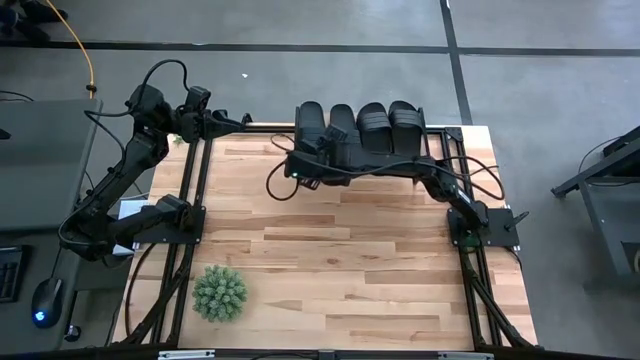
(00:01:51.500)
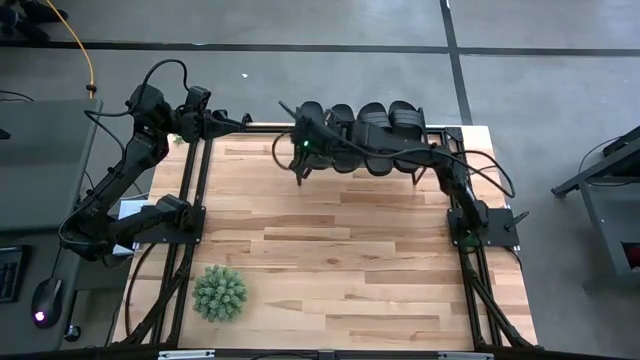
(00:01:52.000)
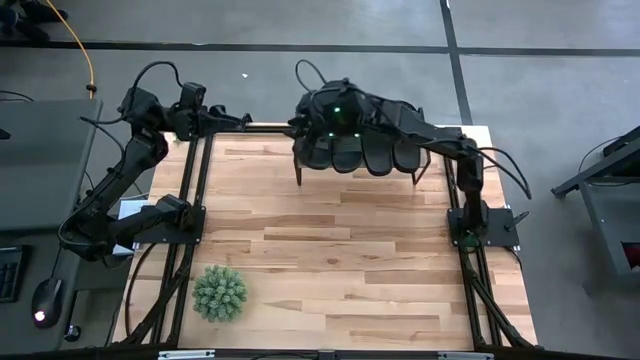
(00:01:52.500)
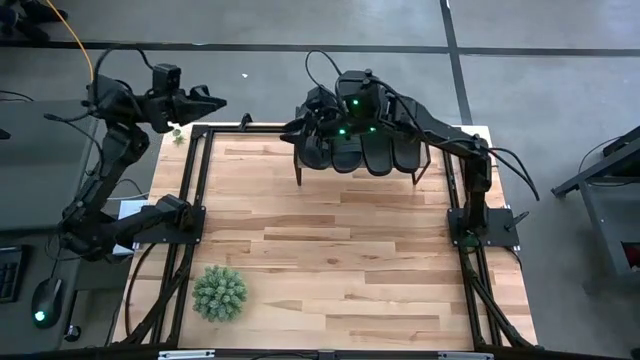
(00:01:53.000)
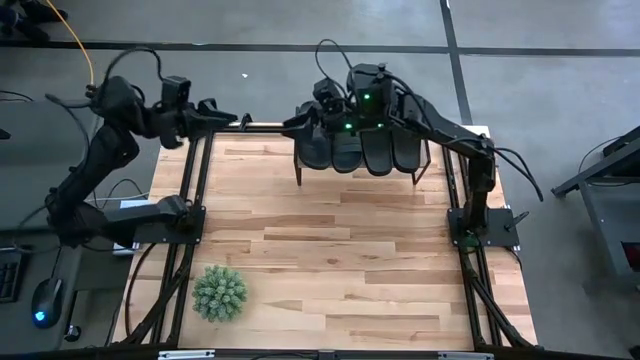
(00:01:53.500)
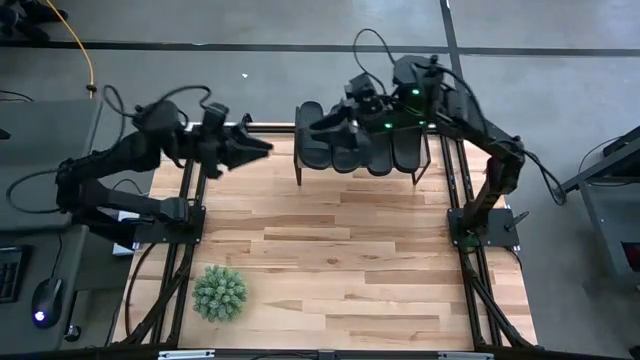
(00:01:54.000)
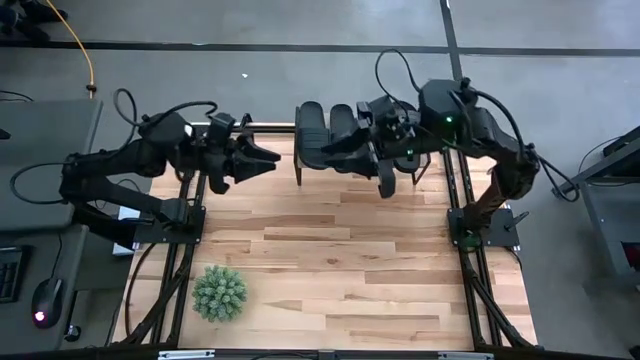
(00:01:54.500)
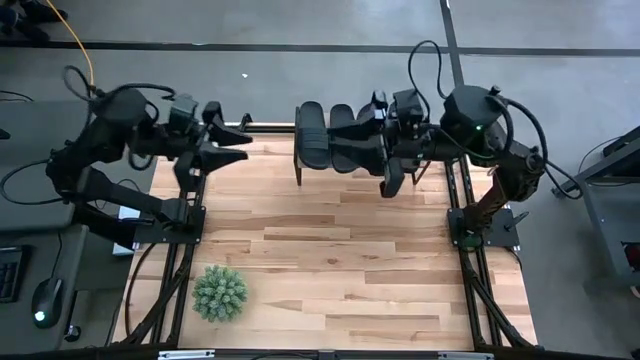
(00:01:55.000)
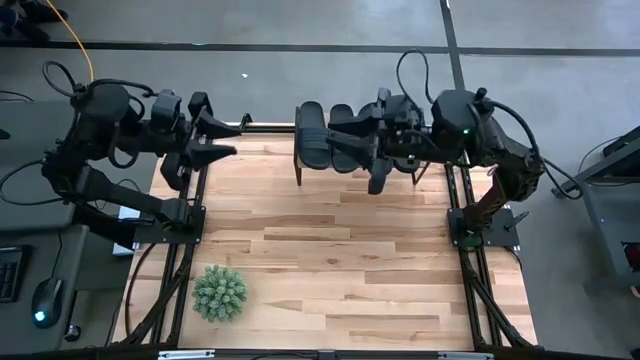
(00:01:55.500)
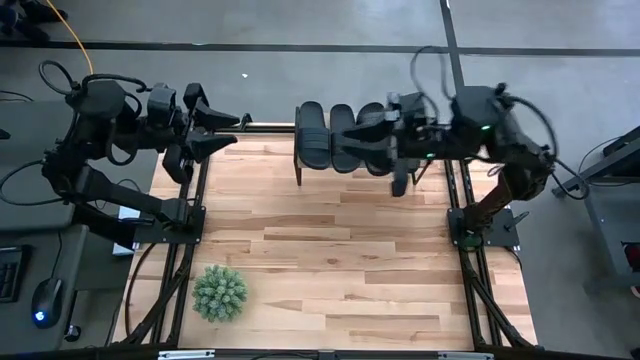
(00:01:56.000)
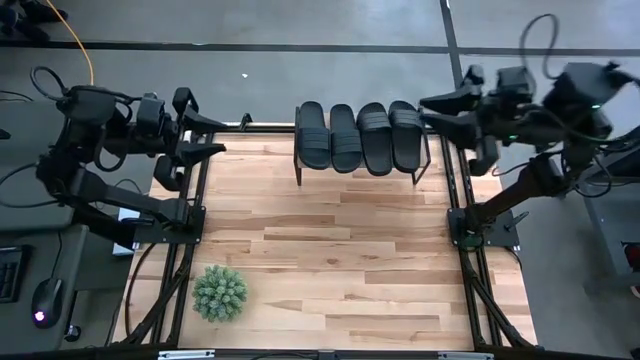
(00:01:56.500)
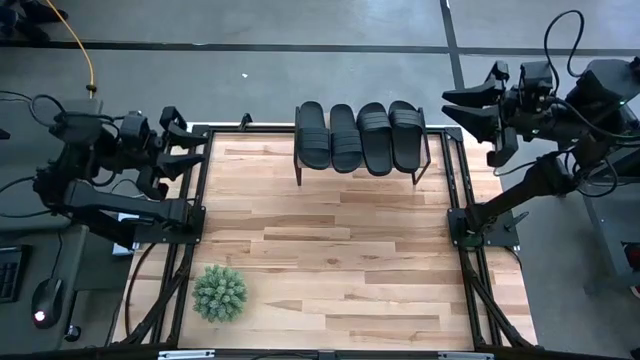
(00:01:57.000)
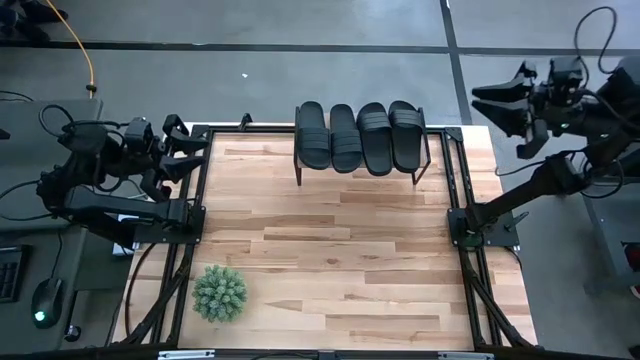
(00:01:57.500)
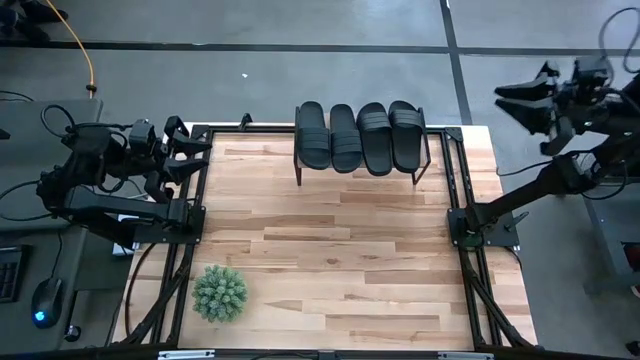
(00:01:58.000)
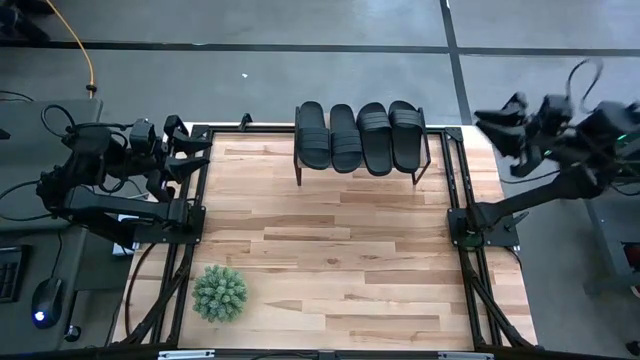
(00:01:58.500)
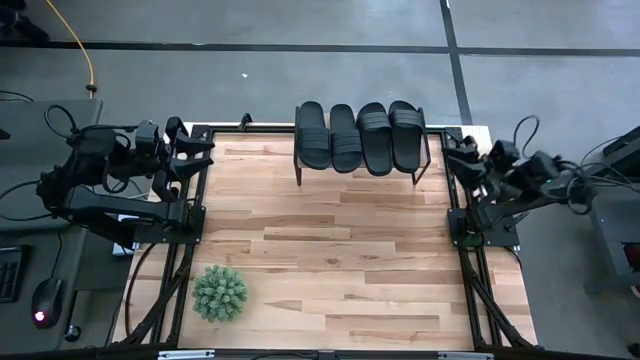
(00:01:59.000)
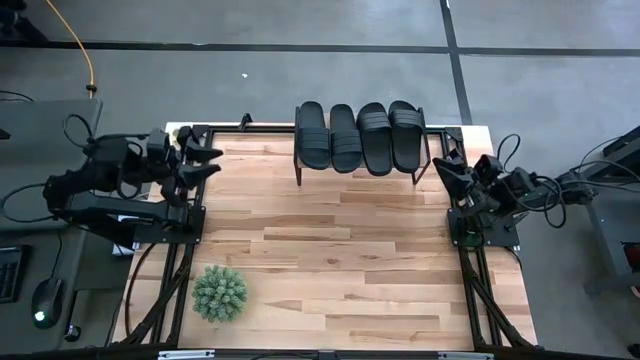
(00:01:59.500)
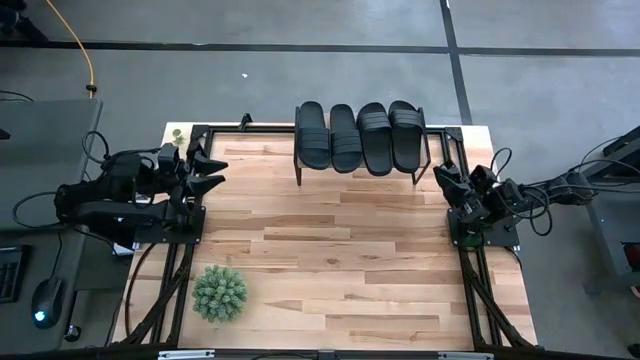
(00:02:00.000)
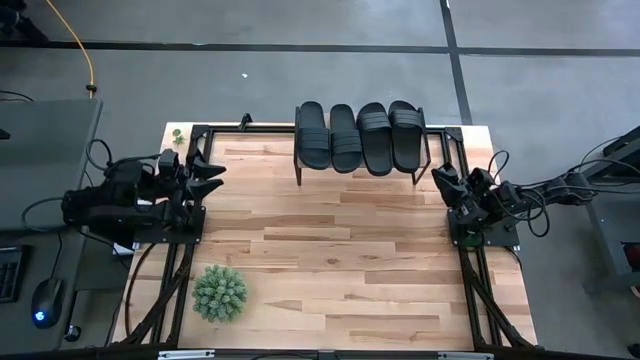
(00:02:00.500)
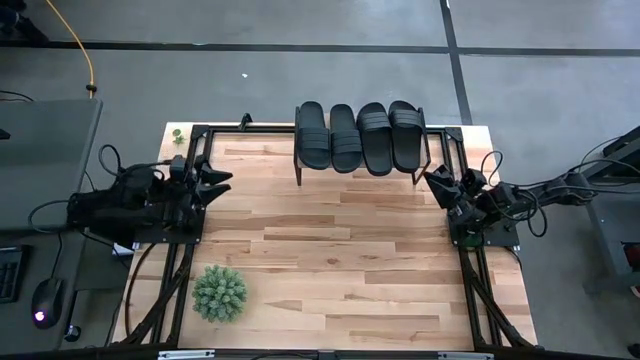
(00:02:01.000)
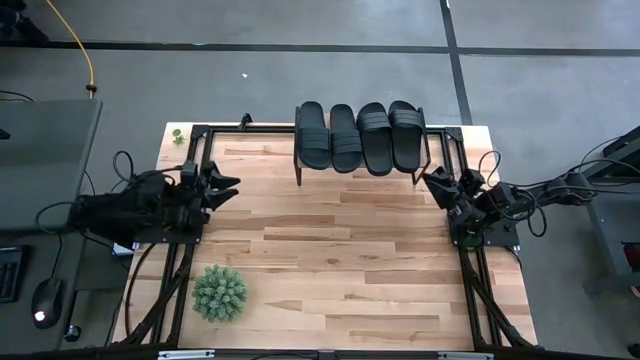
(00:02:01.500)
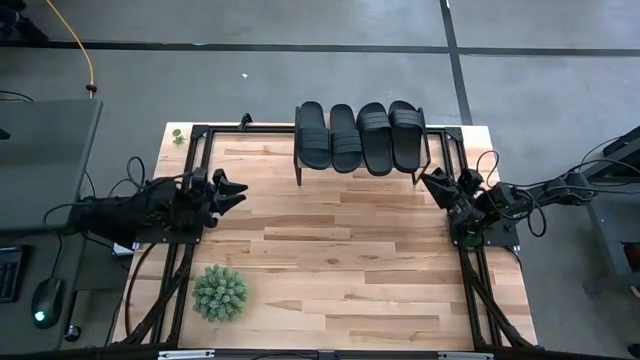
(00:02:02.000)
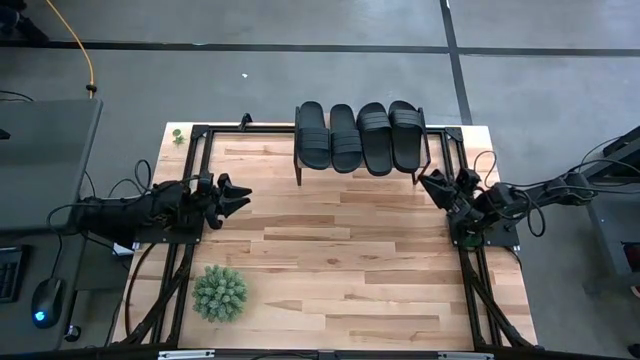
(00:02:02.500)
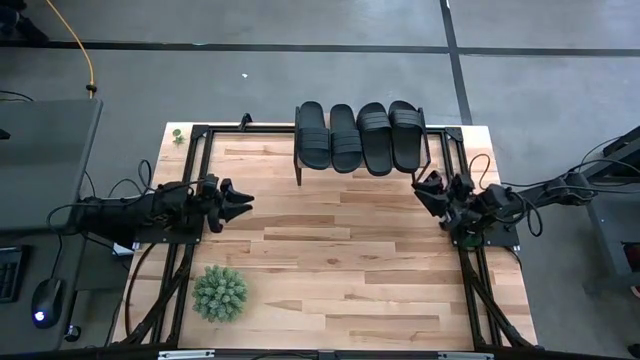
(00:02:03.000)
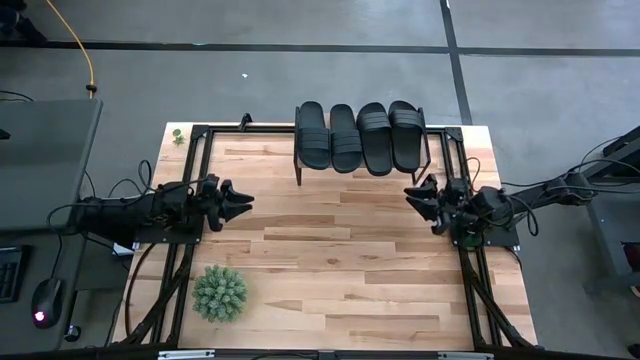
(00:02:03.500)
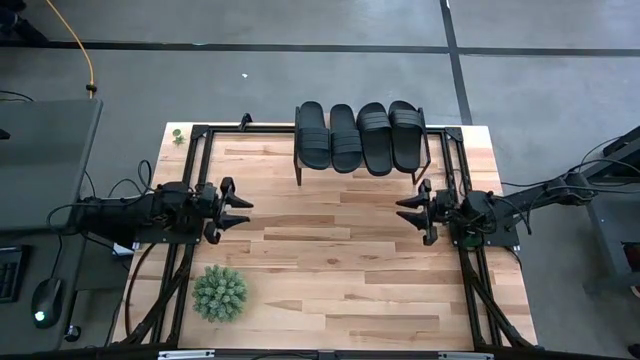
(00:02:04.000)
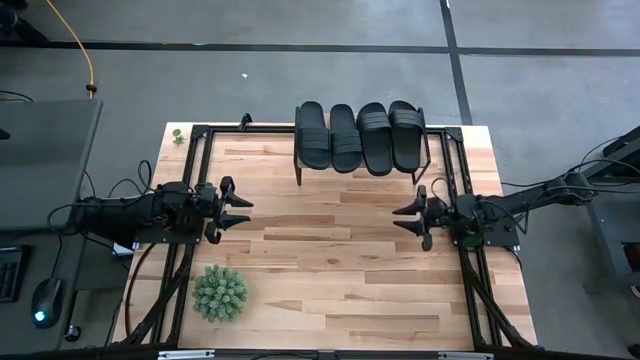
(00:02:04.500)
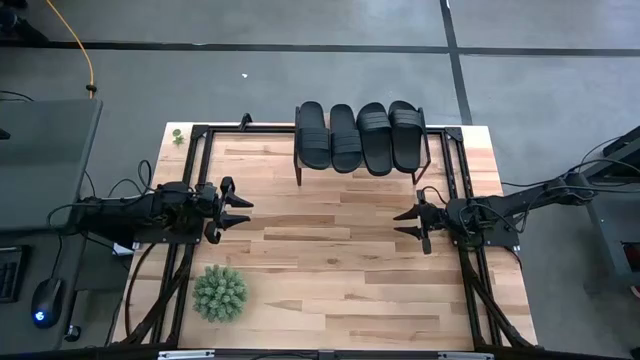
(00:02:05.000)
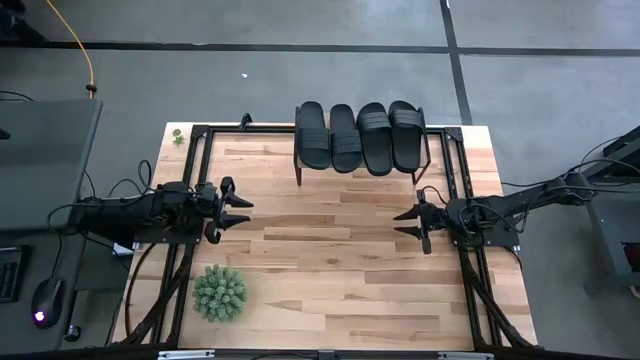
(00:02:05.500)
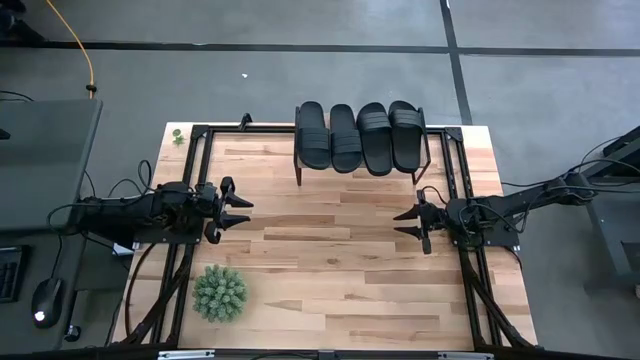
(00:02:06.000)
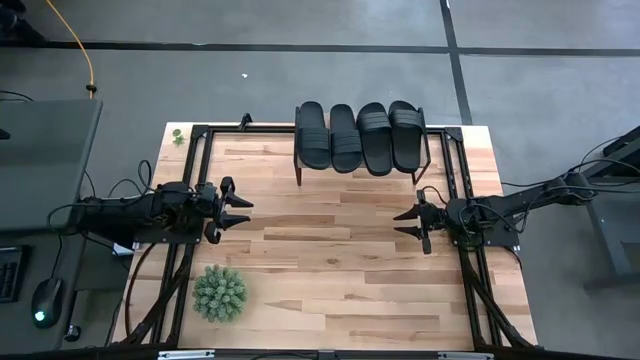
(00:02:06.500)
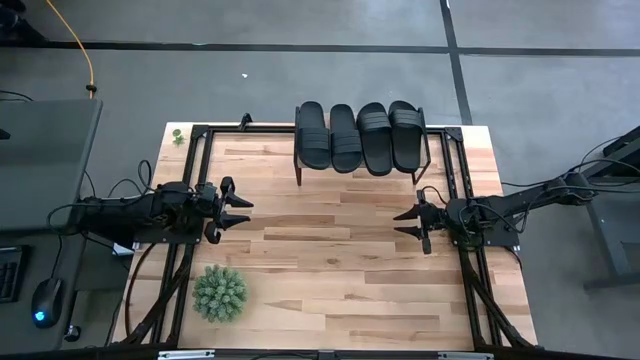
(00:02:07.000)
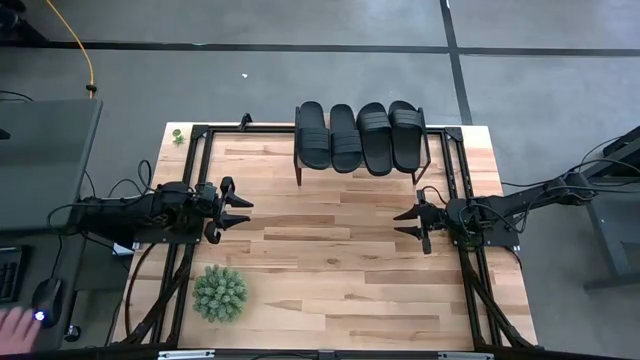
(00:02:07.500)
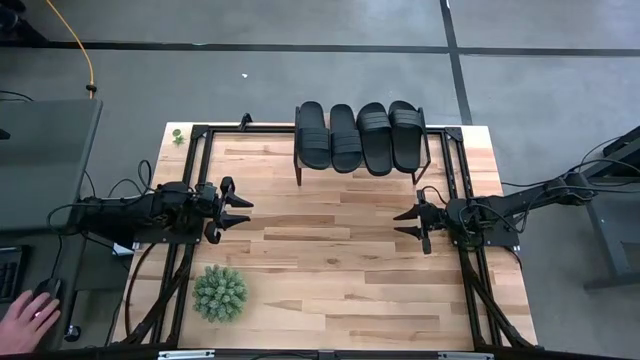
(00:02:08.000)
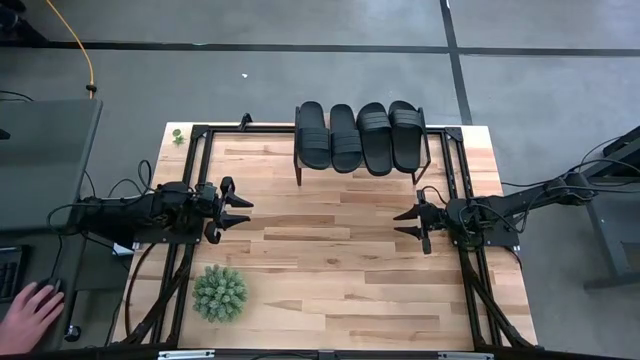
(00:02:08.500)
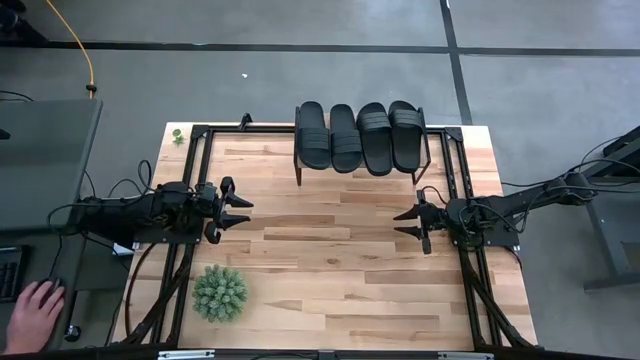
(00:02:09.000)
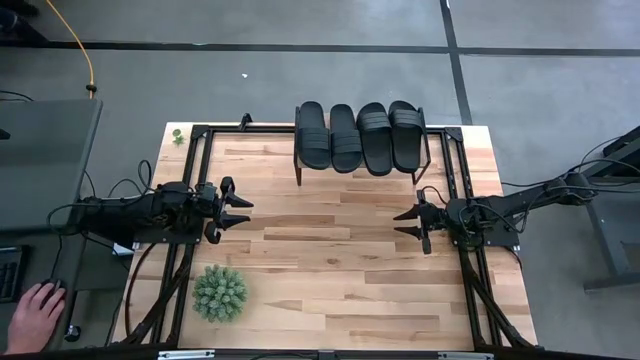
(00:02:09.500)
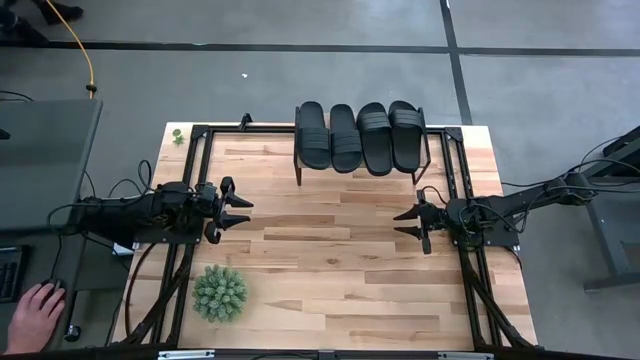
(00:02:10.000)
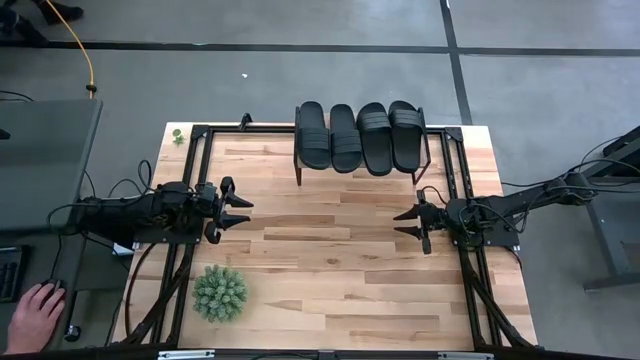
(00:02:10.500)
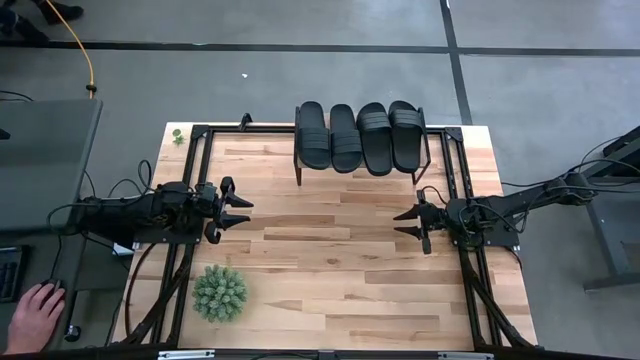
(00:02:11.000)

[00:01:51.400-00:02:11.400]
Task: Pick and place slides into the shelf
Return to Home Position
